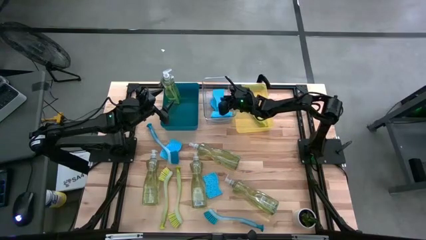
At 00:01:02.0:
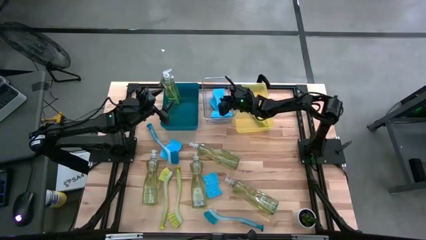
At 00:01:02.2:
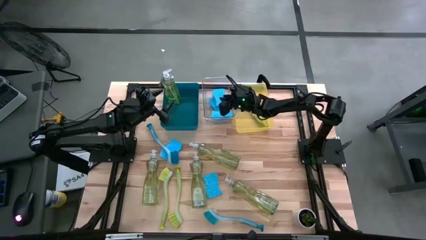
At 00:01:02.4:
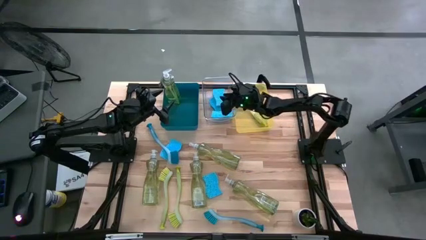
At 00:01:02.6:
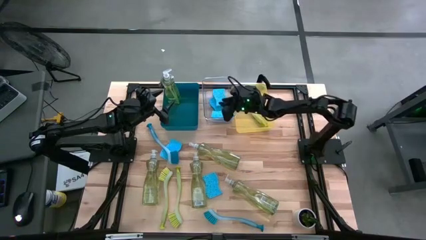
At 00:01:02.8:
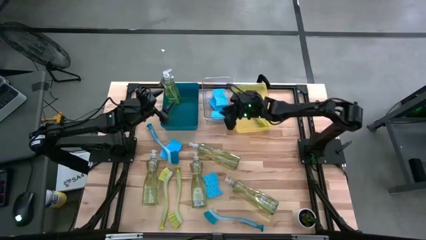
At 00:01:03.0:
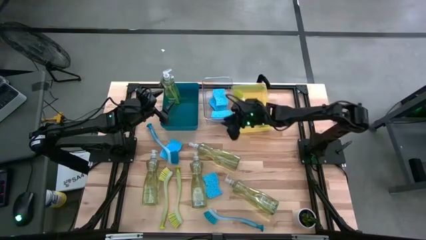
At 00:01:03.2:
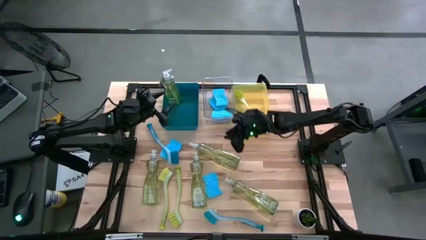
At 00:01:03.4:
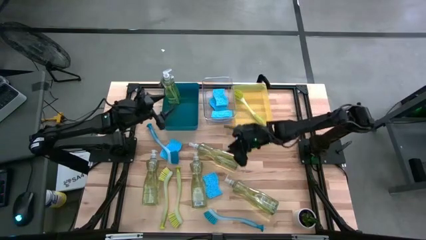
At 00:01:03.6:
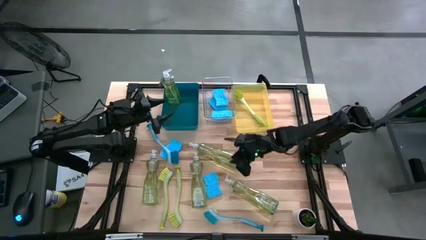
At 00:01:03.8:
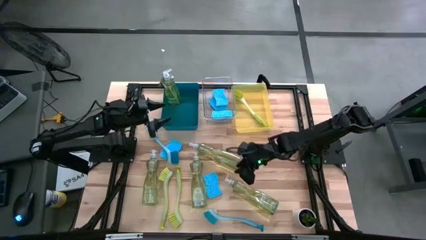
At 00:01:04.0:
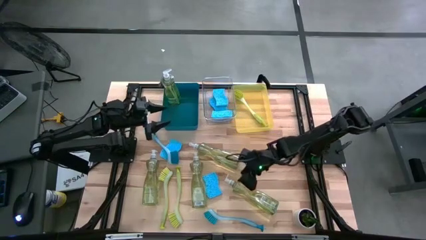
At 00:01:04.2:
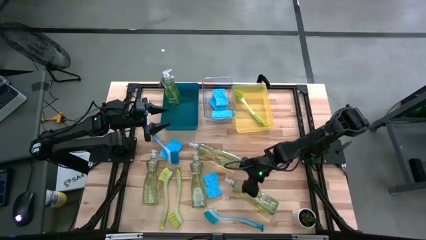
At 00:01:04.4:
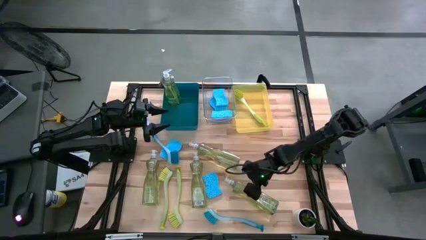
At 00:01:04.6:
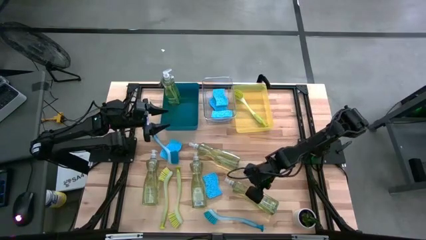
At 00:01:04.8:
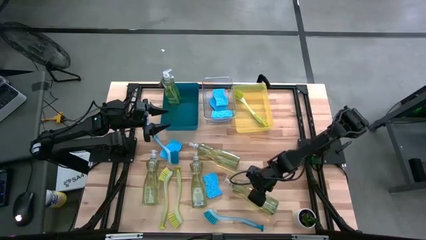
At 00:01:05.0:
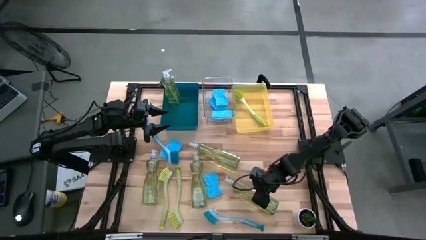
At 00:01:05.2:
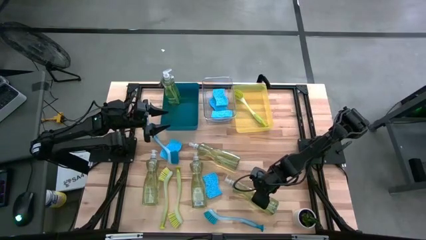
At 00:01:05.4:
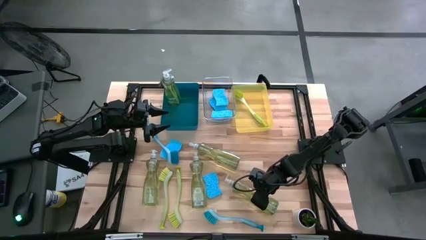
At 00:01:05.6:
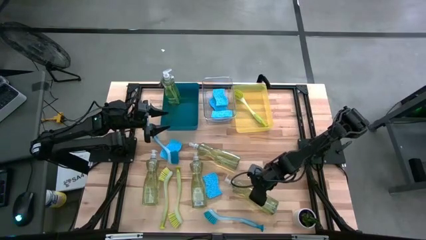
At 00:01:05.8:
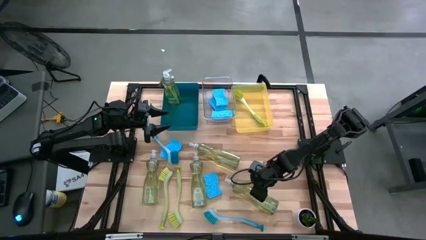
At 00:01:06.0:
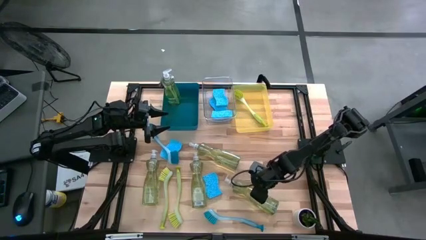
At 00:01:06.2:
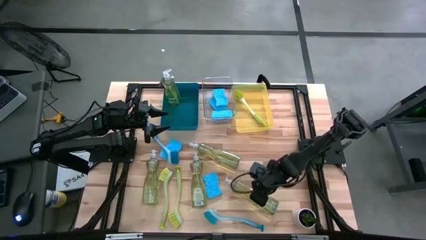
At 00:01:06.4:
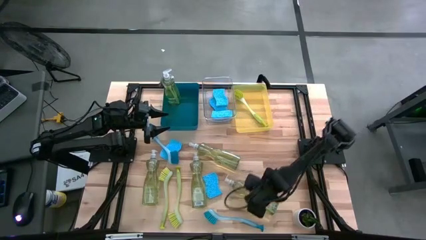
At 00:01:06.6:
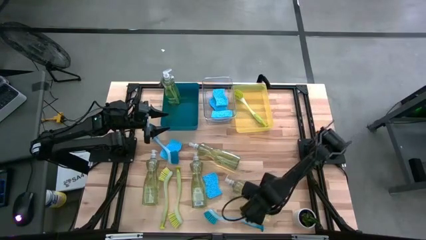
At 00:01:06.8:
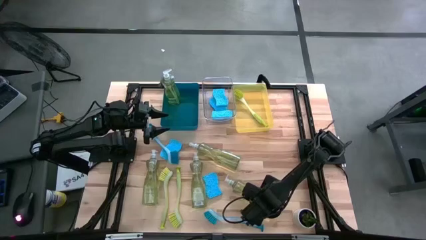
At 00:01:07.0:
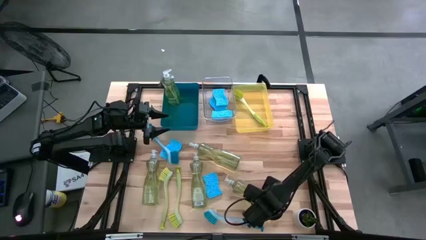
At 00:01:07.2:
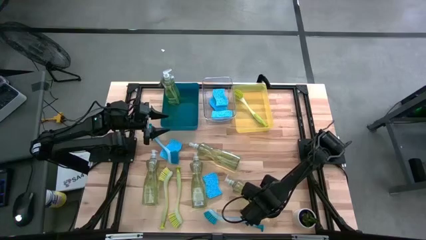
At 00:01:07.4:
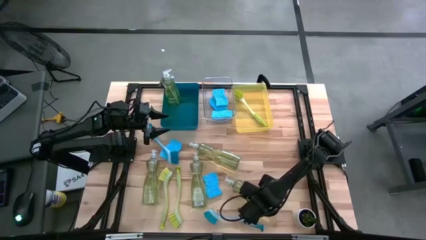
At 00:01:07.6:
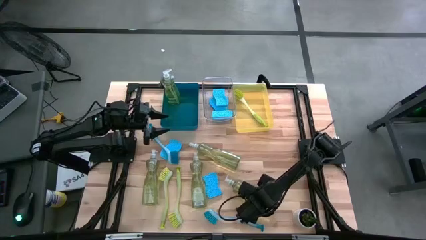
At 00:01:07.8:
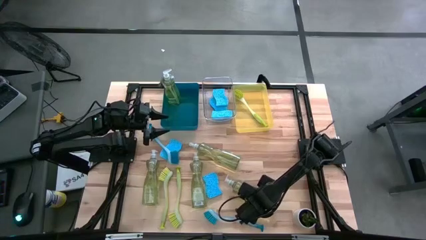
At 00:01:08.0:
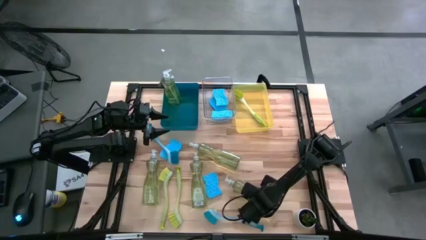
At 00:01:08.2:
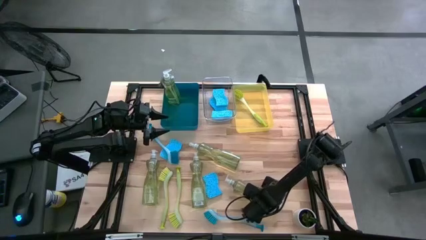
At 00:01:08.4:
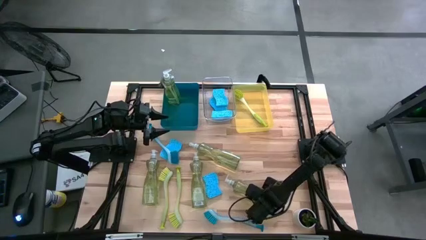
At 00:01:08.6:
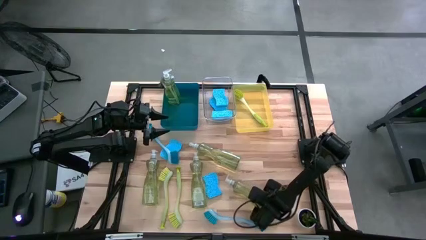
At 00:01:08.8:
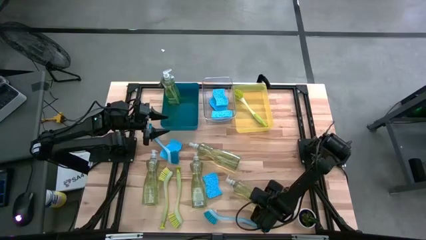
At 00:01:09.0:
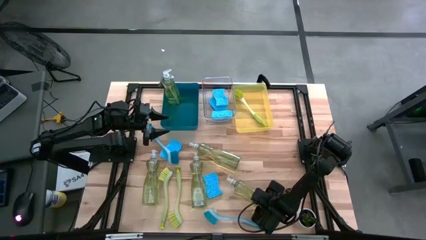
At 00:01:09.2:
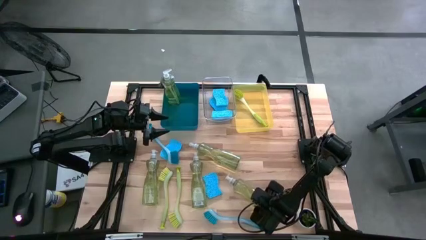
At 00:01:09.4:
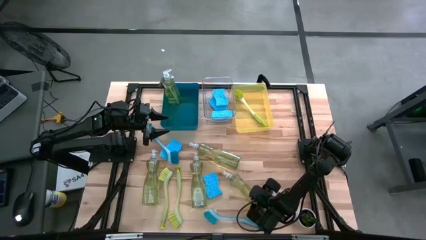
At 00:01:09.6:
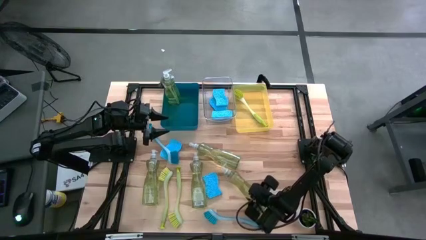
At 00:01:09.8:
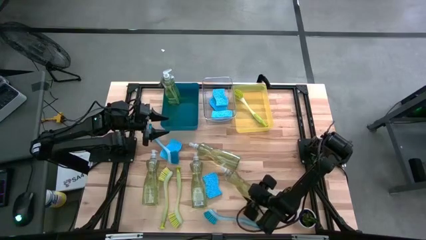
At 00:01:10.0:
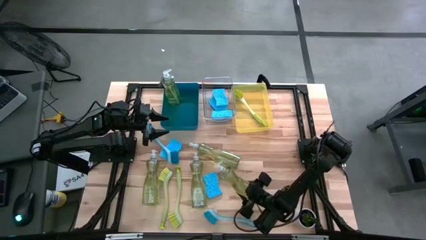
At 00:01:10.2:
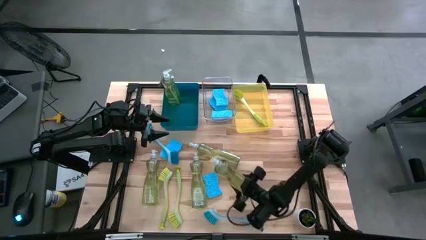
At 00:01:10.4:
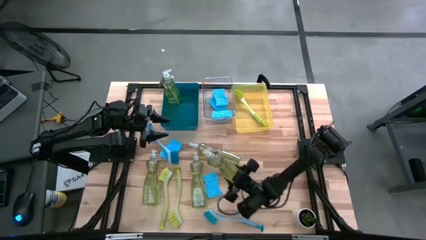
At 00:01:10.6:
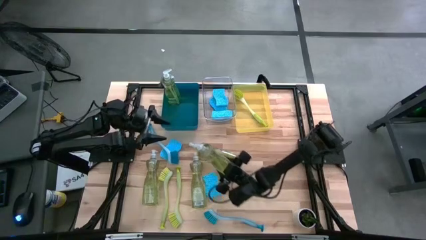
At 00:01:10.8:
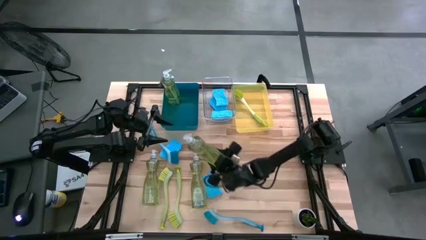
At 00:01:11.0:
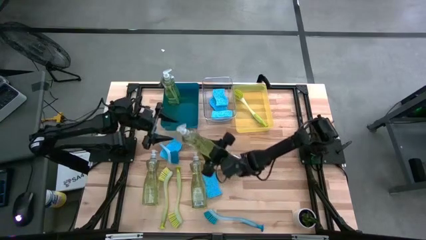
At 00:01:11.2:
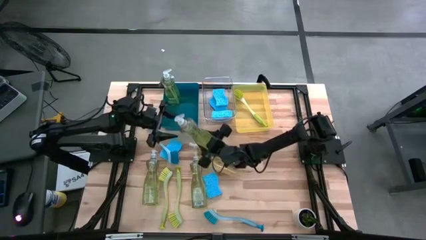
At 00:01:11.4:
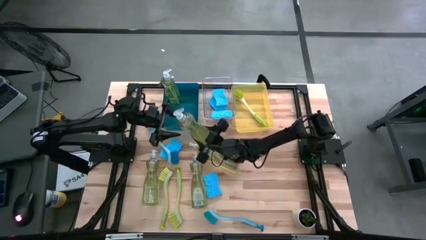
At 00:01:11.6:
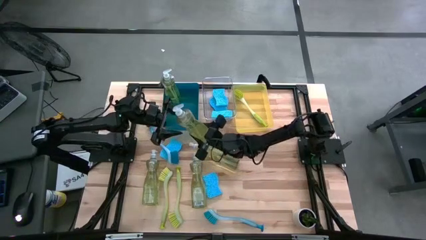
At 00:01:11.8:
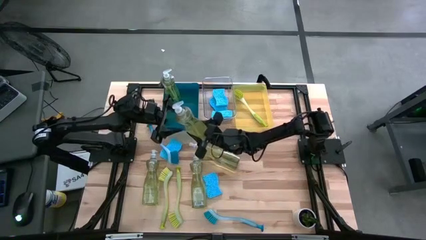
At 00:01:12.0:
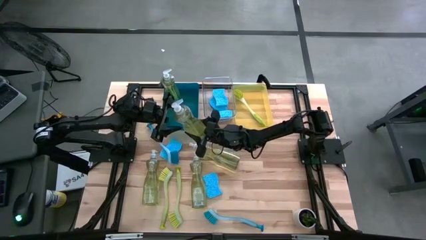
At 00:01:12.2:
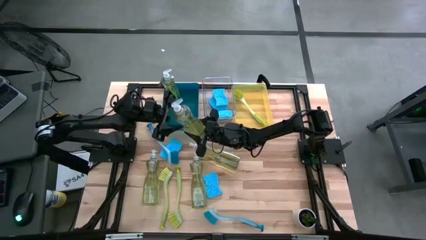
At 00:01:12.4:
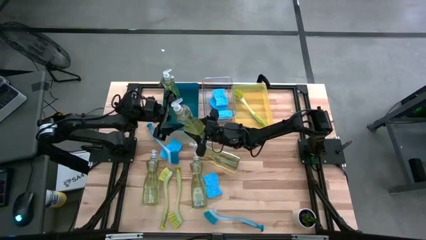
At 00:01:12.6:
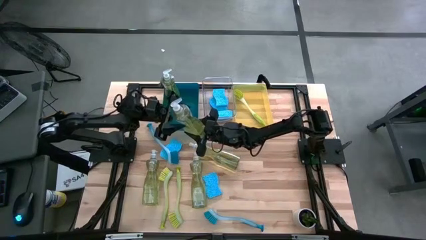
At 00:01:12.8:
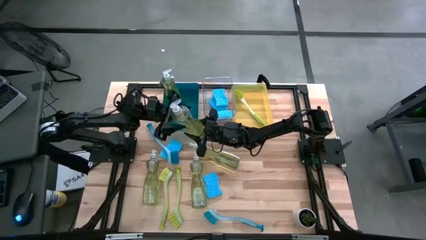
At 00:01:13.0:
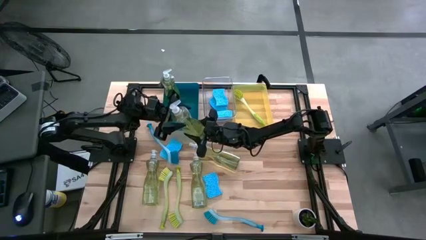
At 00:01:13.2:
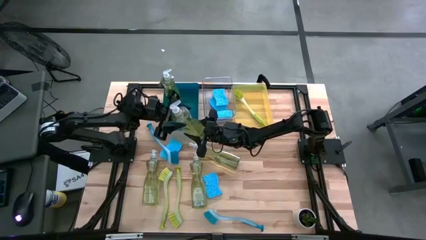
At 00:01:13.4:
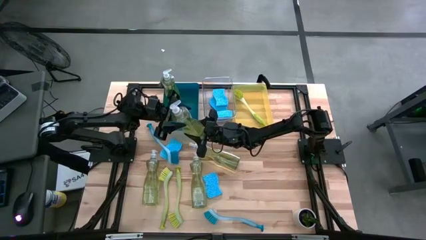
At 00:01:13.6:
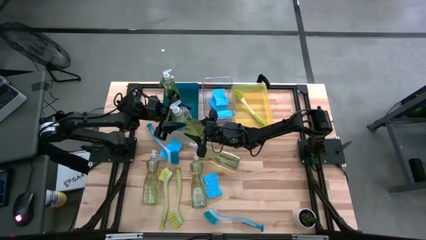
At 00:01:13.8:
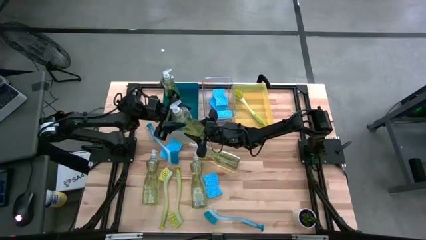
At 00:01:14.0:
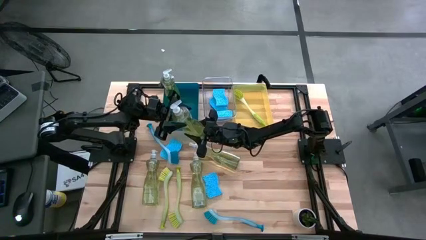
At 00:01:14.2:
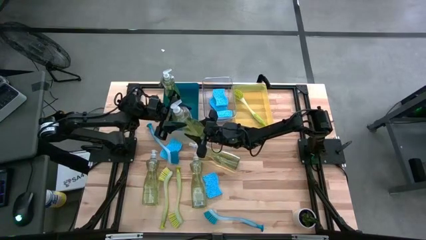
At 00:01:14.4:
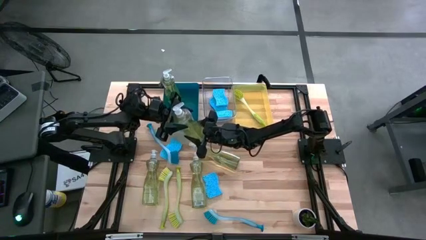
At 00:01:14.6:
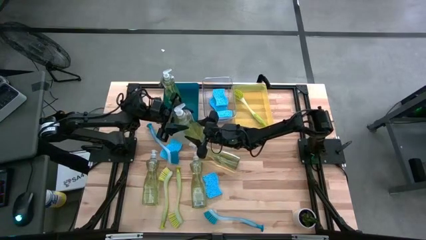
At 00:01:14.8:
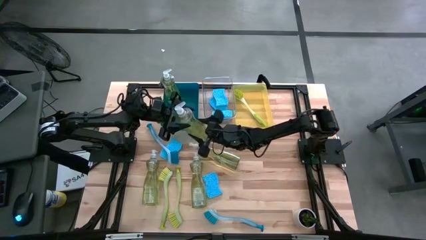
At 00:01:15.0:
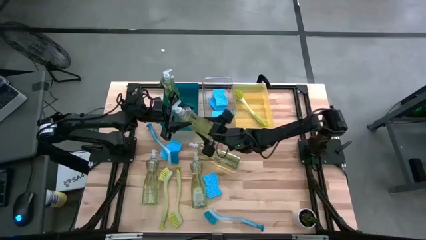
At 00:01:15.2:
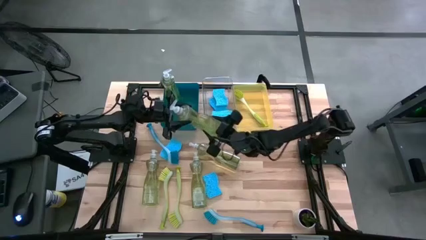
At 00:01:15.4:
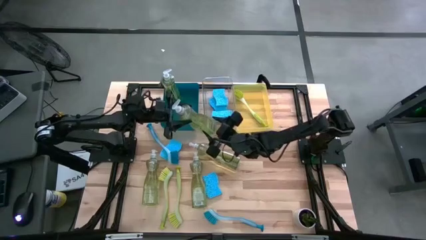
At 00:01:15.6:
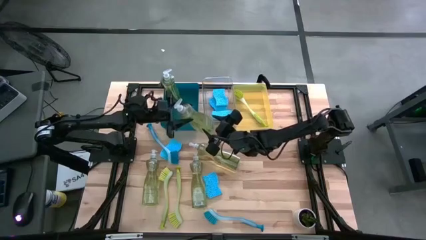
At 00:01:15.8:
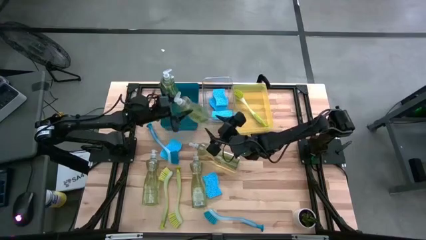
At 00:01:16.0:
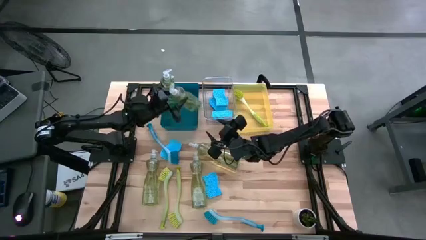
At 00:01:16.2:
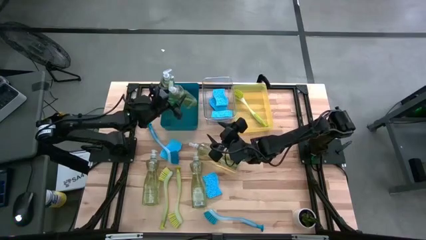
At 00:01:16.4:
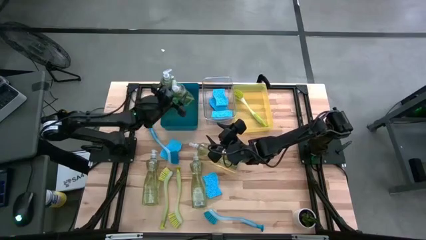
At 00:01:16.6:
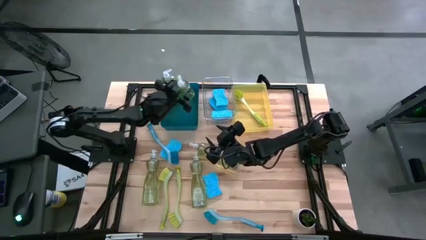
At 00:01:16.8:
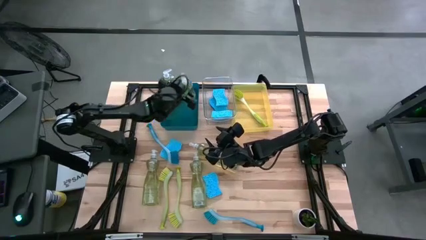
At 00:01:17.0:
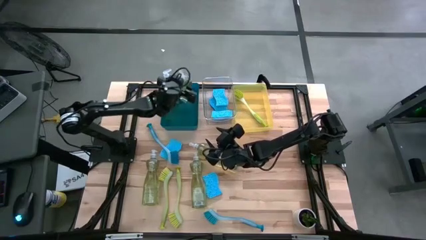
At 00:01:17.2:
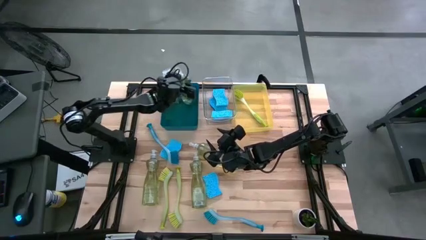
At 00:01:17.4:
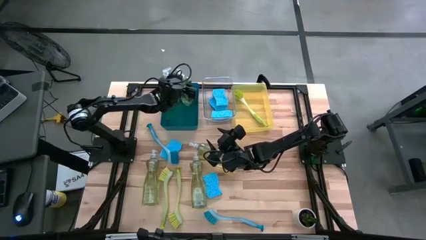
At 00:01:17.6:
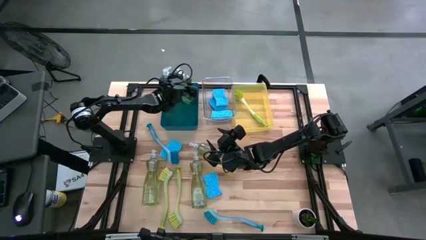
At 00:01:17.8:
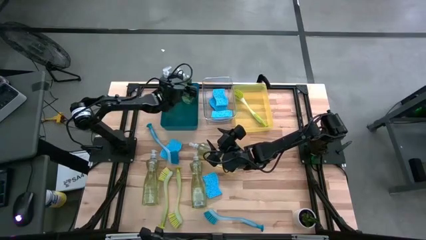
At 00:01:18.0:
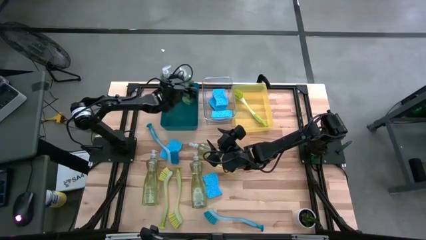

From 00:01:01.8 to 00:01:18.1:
Task: Pick & Place Kitchen Sink Supplies
Put the dishwashing liquid into the blue bin
